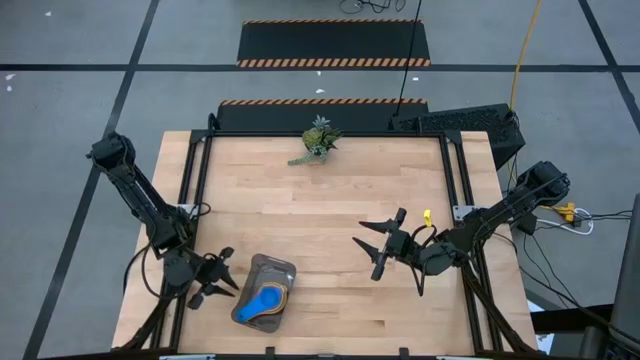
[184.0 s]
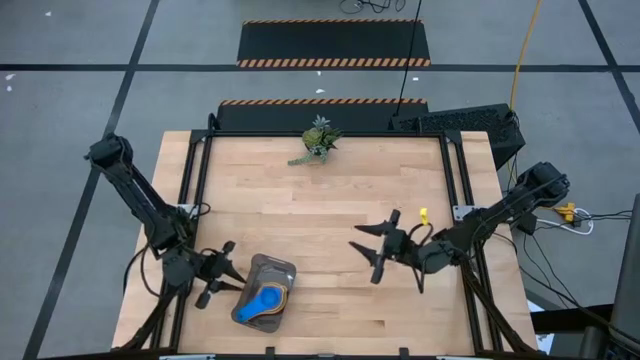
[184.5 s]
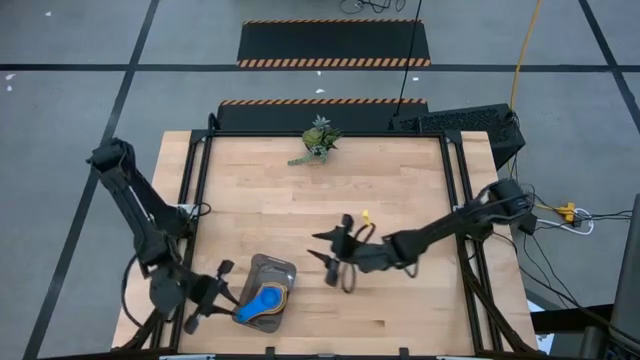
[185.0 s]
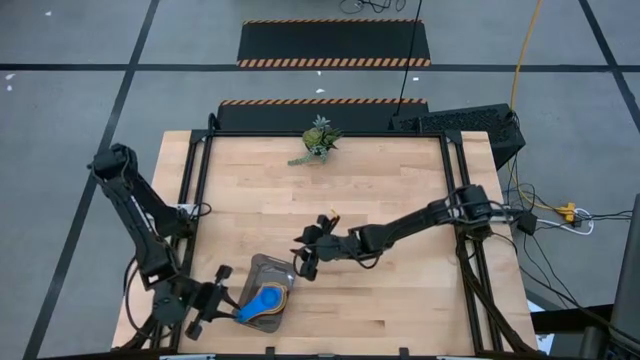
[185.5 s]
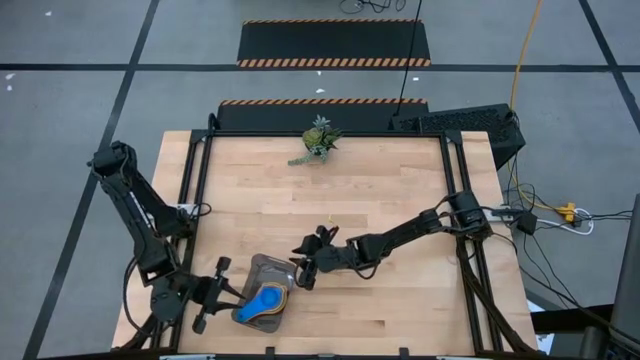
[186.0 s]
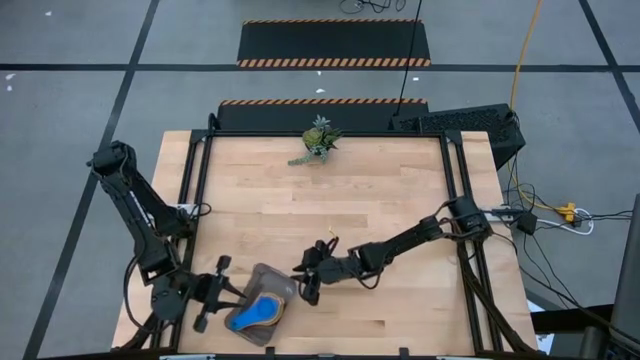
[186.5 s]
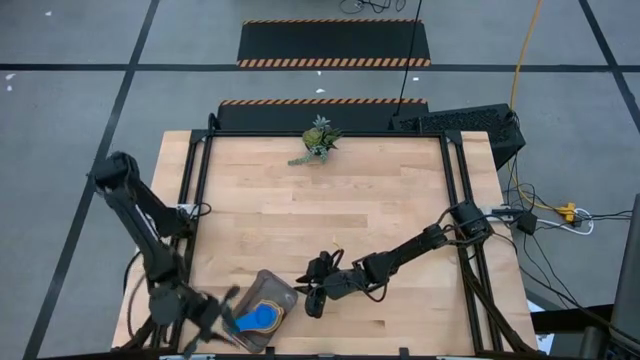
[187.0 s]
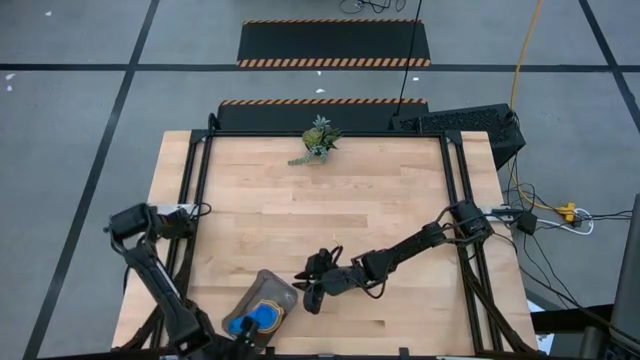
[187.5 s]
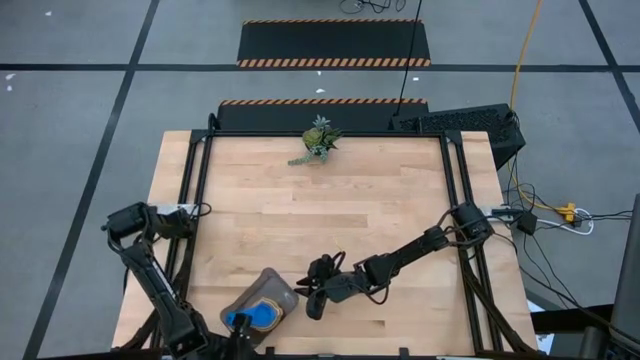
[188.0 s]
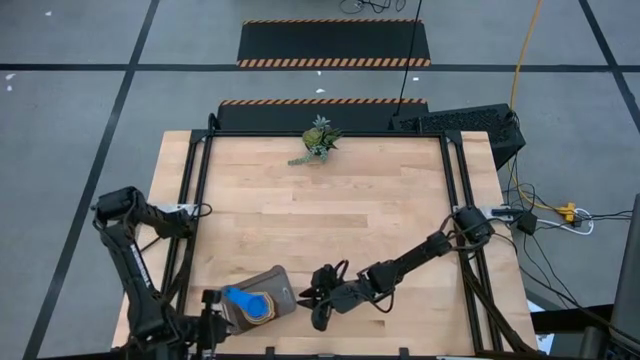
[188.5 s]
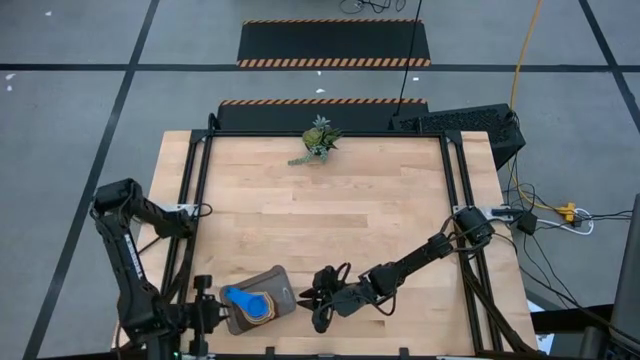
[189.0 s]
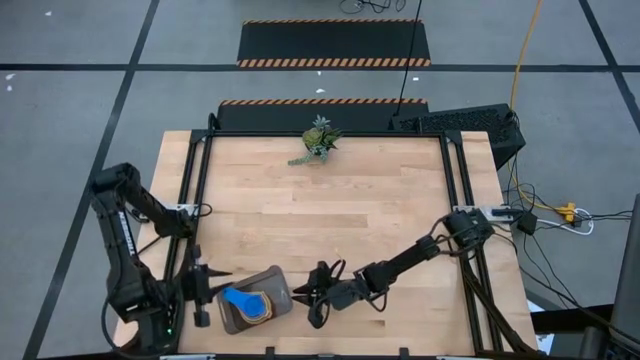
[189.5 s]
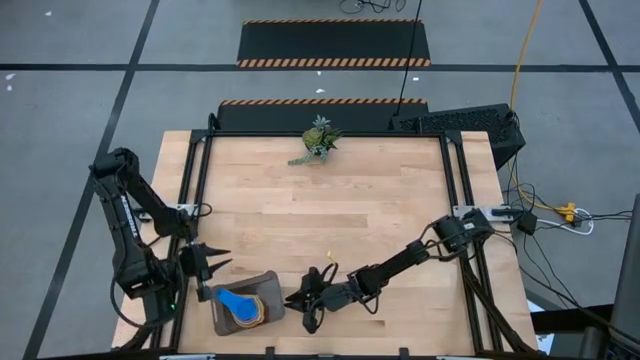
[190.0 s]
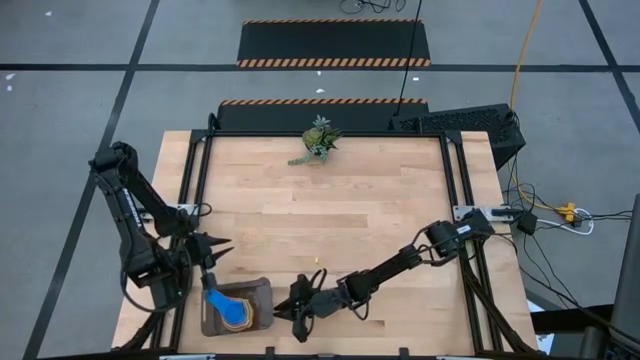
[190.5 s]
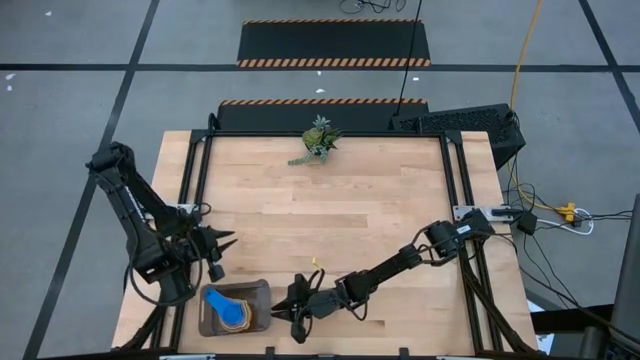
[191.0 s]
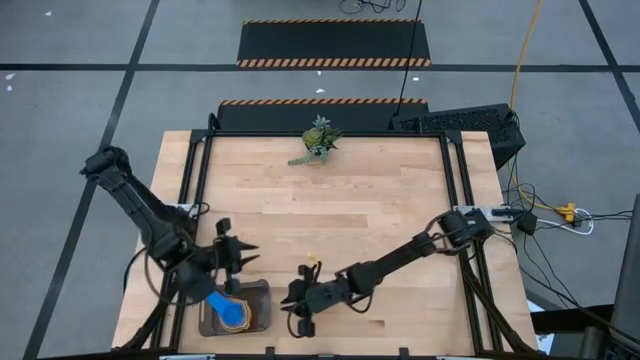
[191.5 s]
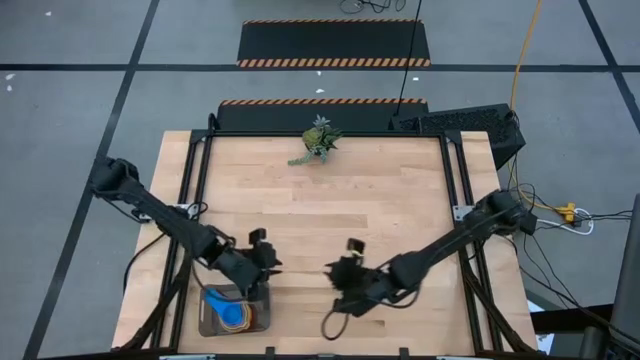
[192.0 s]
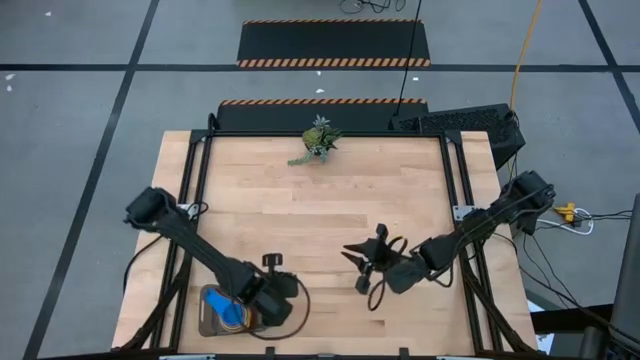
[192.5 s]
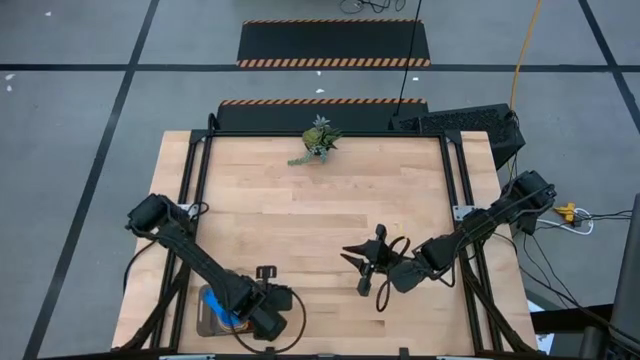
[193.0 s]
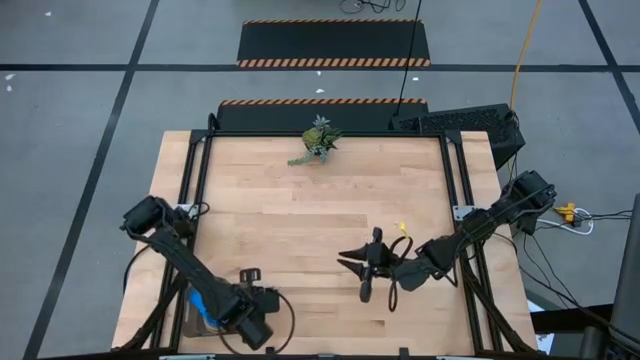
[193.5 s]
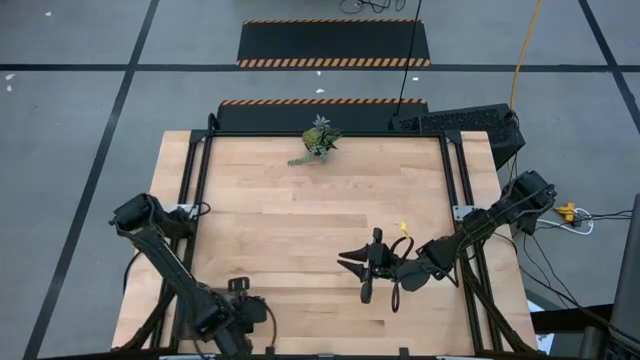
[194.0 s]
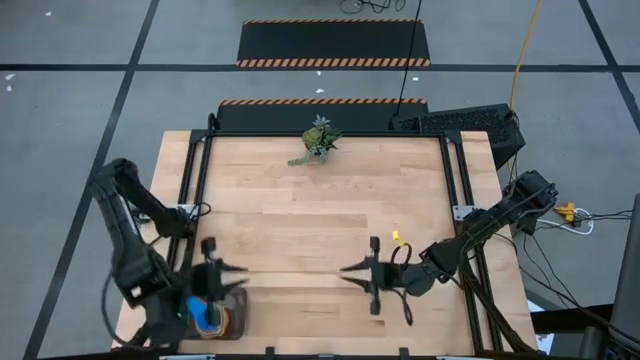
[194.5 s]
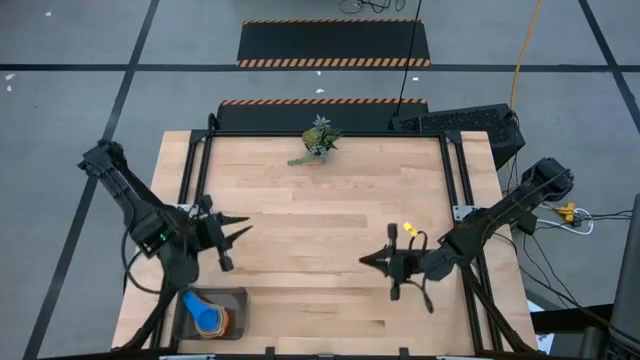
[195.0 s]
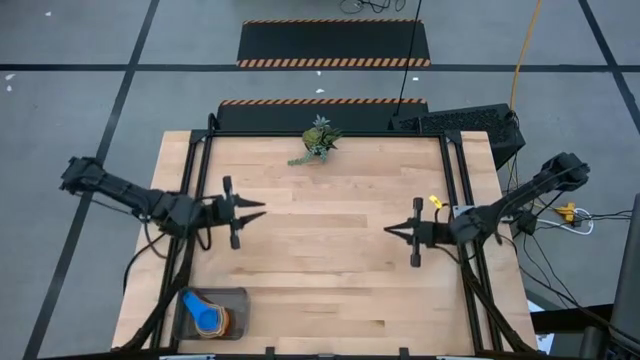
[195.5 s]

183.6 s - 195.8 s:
Task: Nest measuring cups in basket
Return to Home Position

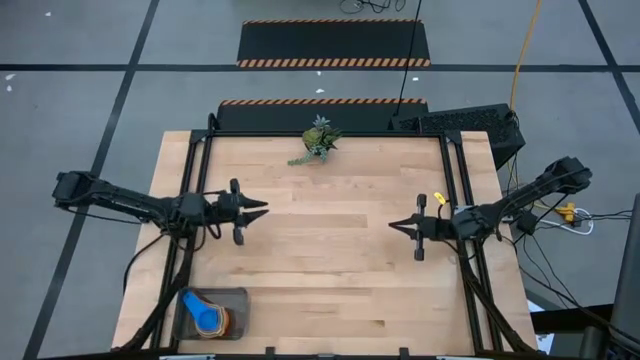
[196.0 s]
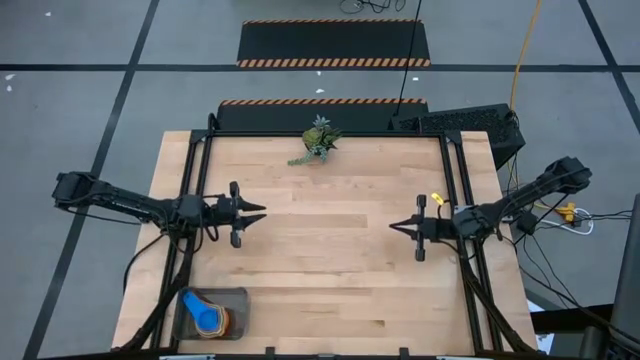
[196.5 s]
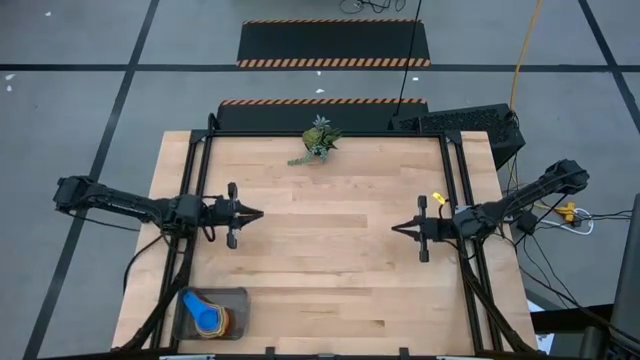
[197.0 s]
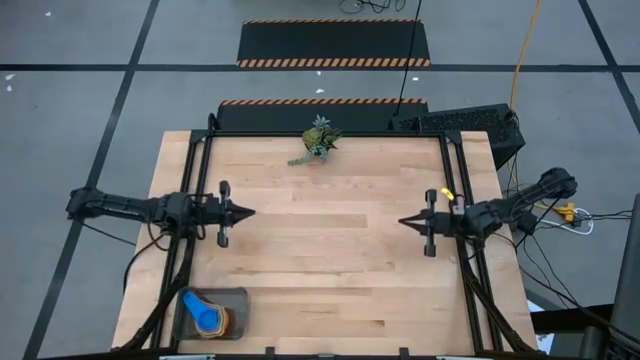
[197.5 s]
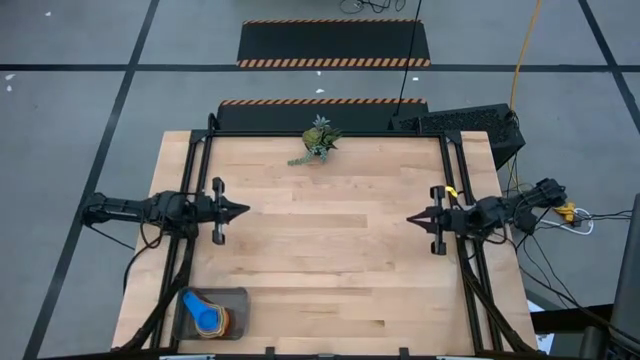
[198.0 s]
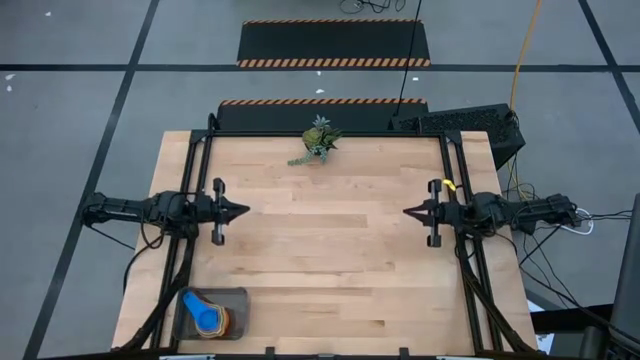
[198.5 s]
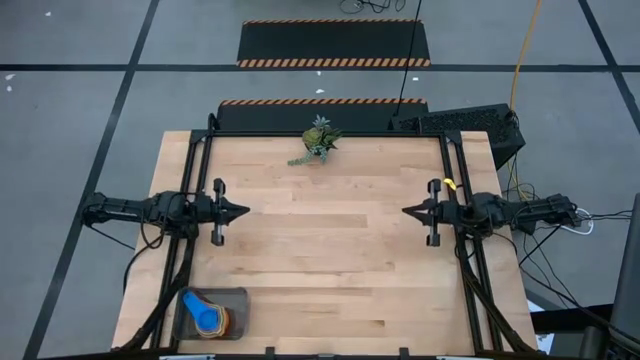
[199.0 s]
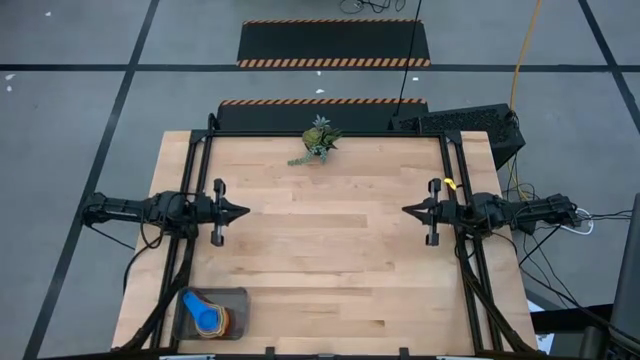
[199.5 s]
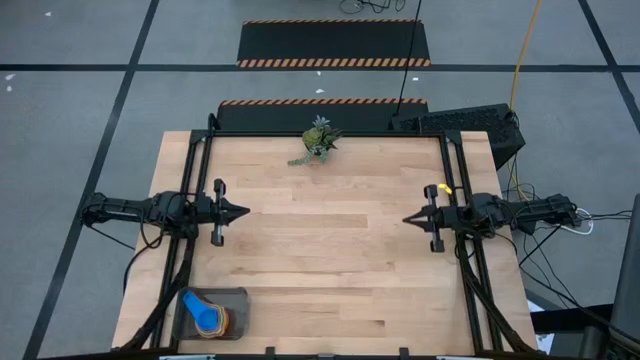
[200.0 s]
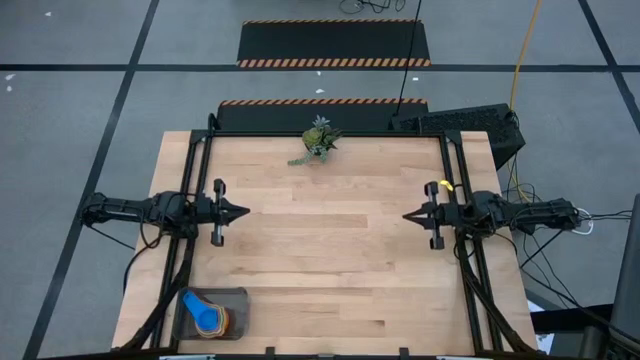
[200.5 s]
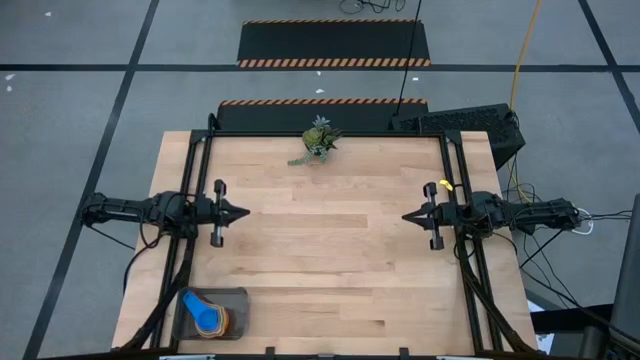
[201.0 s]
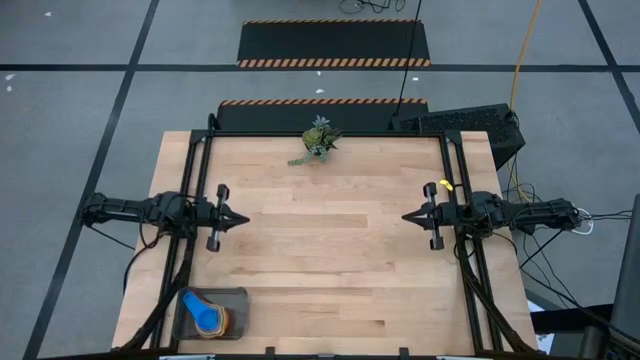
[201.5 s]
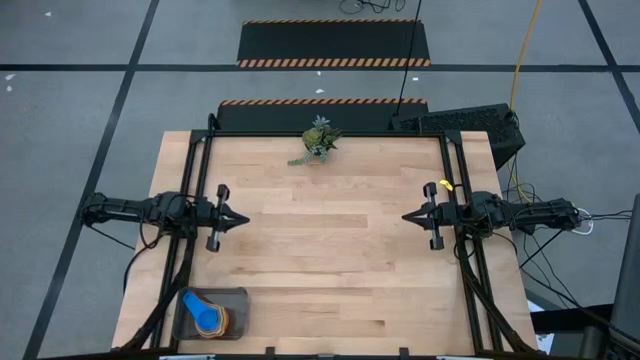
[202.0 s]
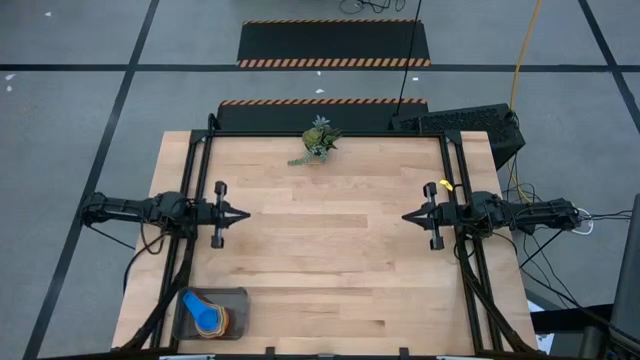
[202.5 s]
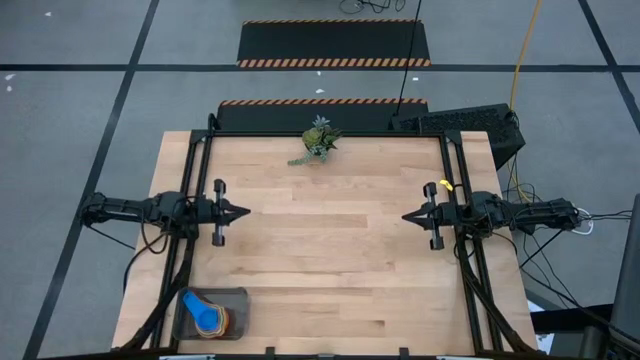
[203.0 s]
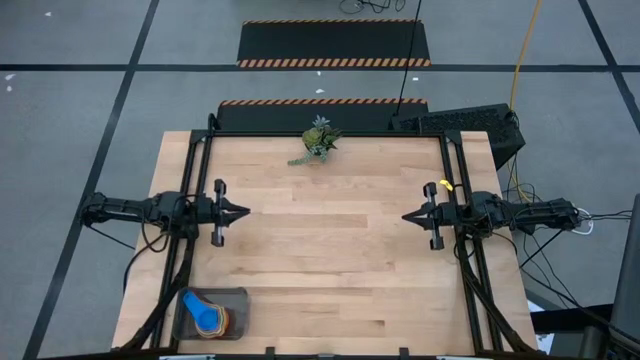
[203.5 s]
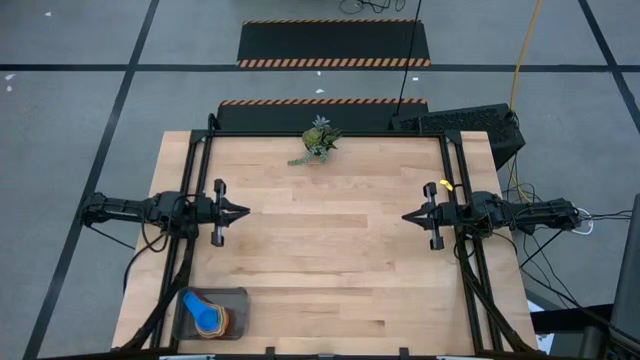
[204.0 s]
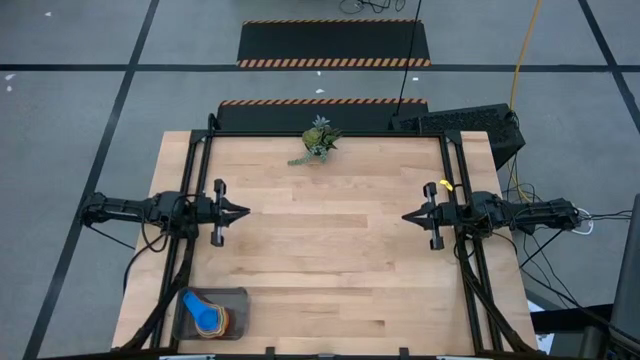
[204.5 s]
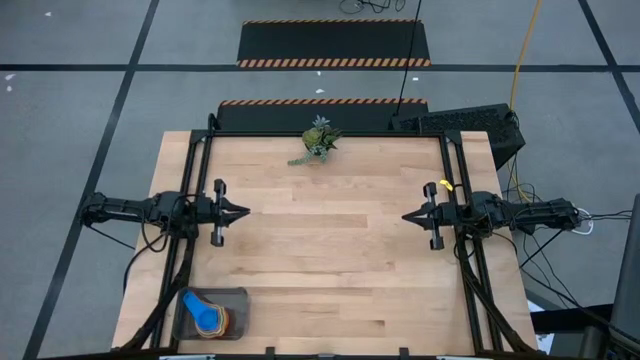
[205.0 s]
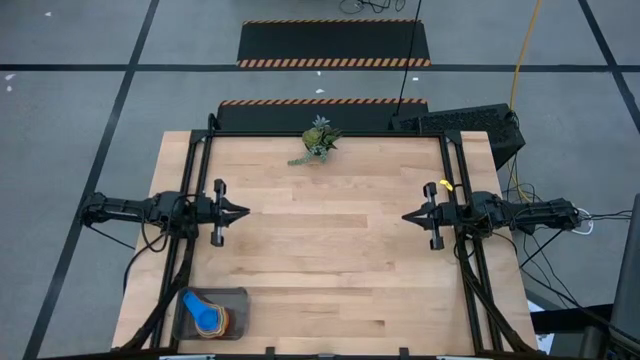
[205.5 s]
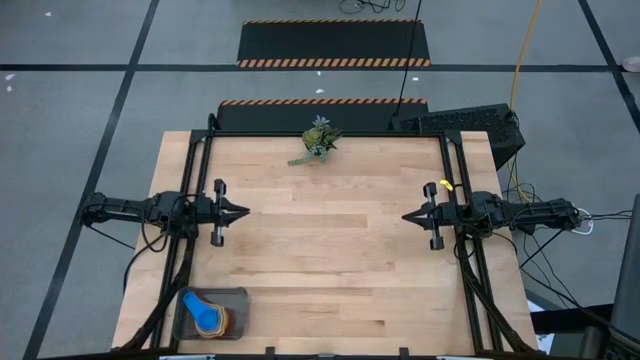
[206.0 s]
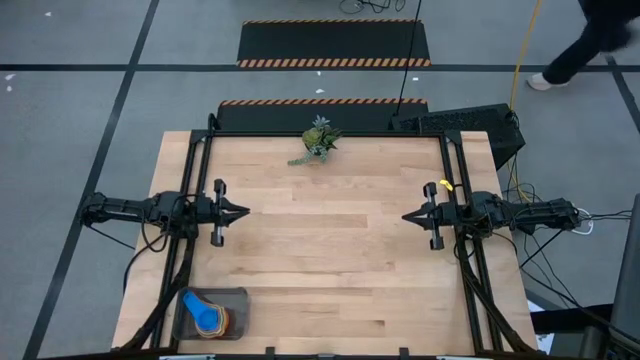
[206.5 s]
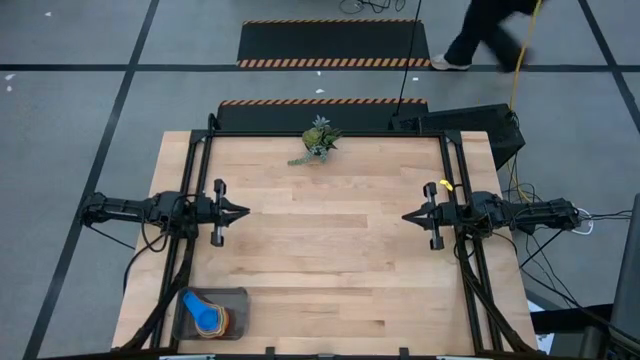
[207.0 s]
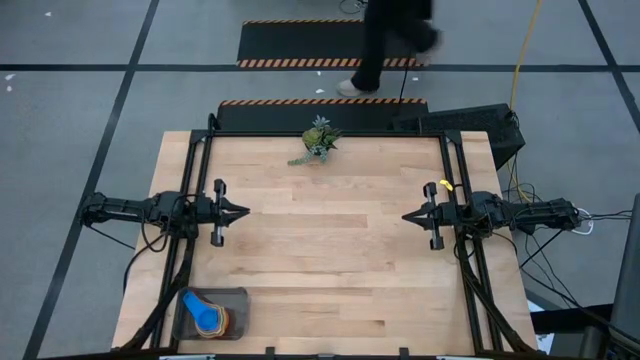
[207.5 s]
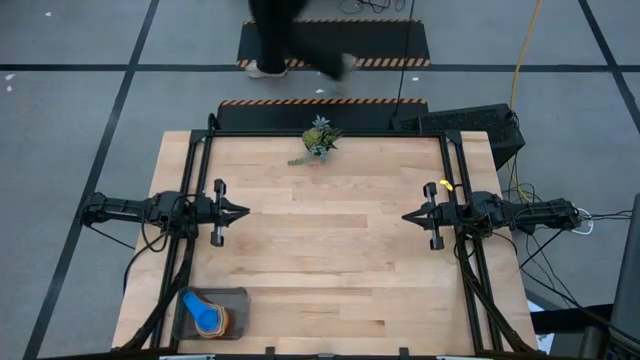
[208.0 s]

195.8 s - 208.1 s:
Return to Home Position
